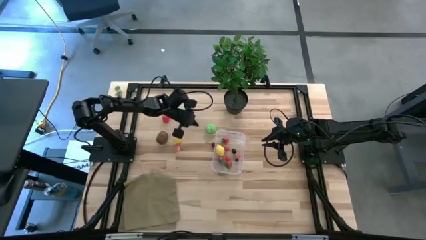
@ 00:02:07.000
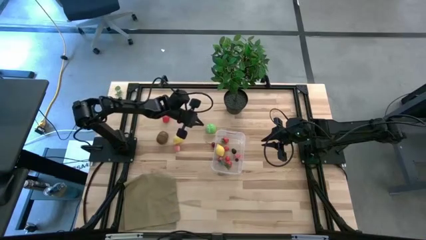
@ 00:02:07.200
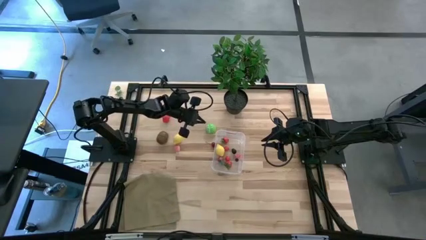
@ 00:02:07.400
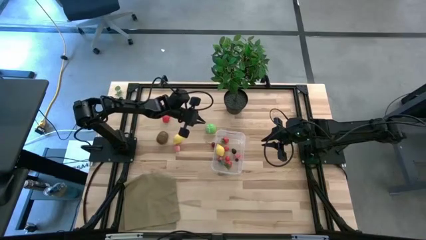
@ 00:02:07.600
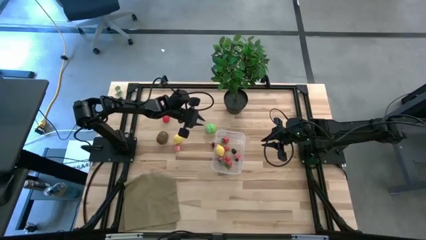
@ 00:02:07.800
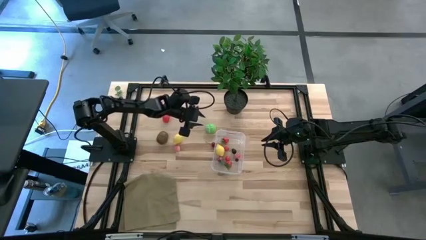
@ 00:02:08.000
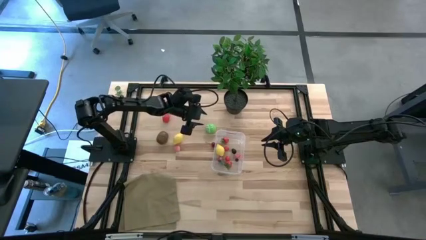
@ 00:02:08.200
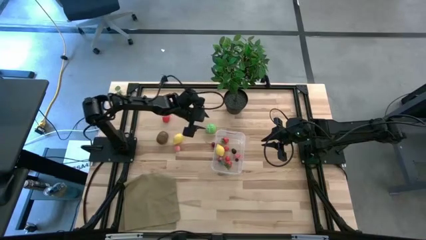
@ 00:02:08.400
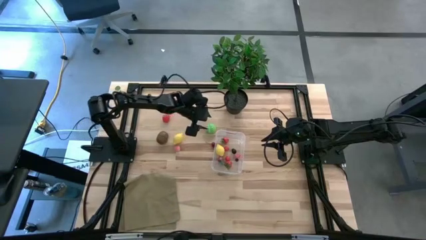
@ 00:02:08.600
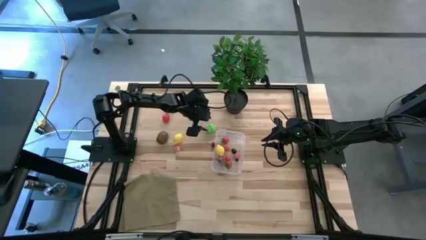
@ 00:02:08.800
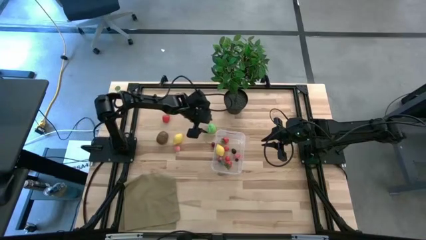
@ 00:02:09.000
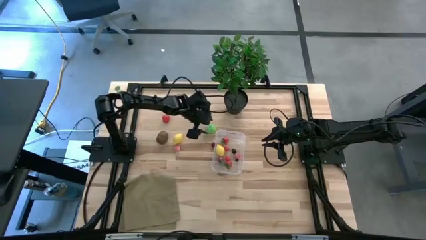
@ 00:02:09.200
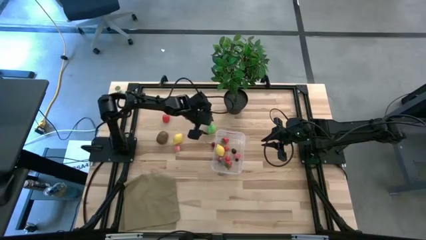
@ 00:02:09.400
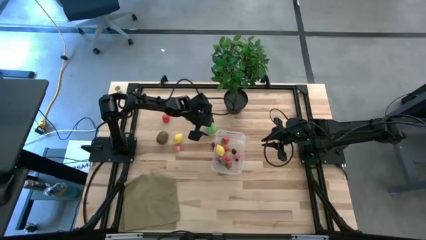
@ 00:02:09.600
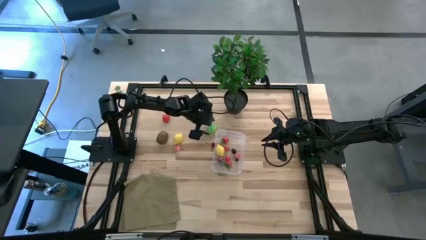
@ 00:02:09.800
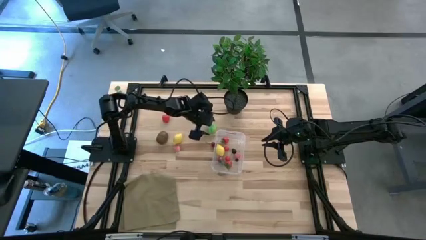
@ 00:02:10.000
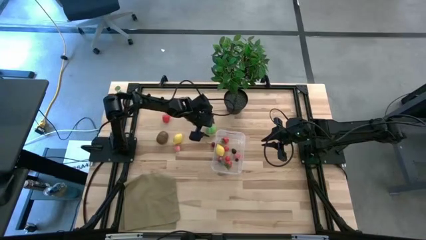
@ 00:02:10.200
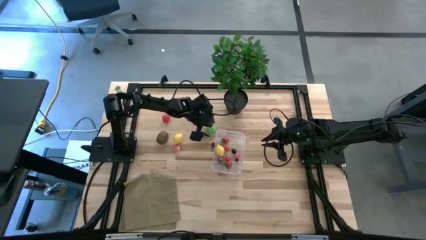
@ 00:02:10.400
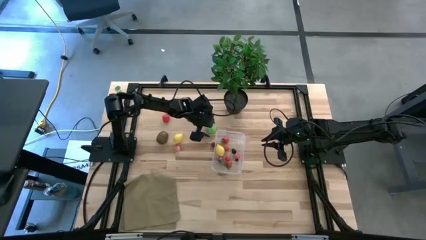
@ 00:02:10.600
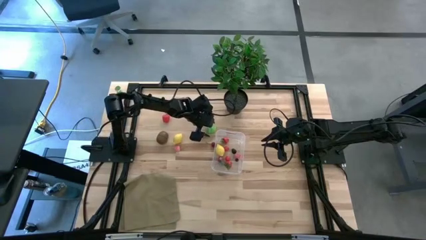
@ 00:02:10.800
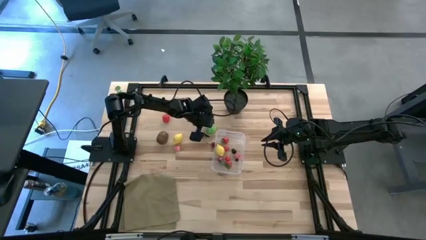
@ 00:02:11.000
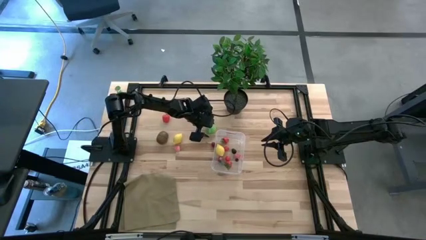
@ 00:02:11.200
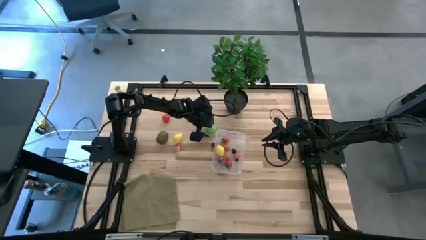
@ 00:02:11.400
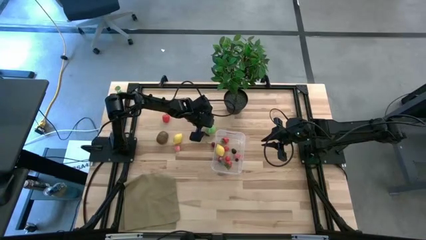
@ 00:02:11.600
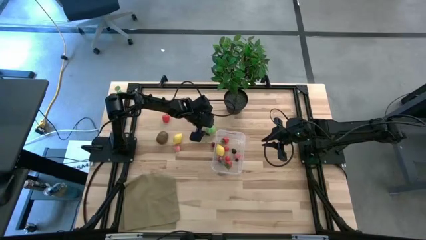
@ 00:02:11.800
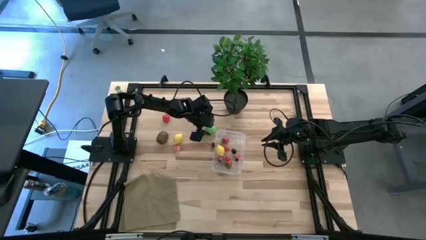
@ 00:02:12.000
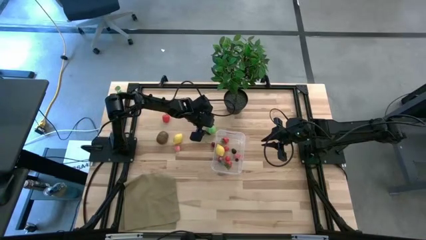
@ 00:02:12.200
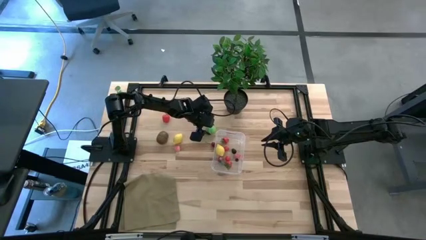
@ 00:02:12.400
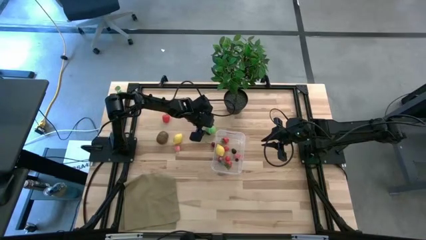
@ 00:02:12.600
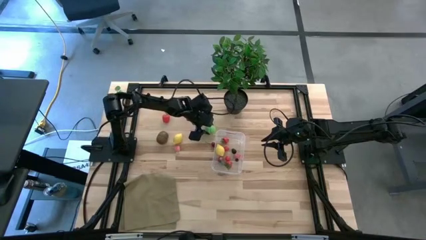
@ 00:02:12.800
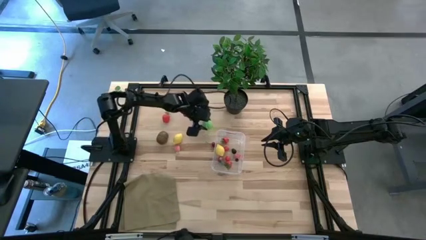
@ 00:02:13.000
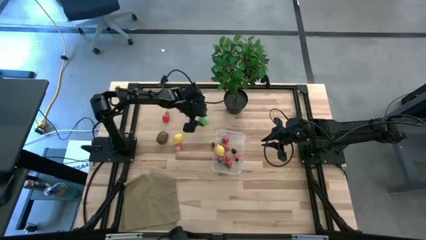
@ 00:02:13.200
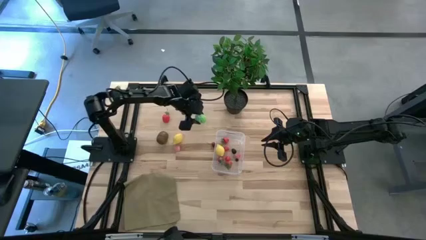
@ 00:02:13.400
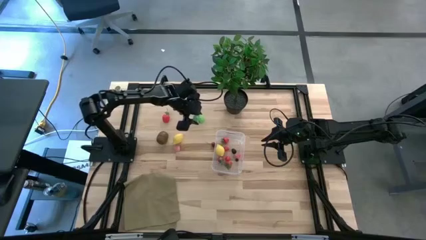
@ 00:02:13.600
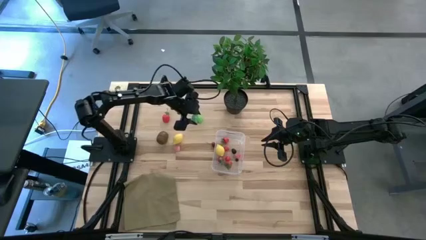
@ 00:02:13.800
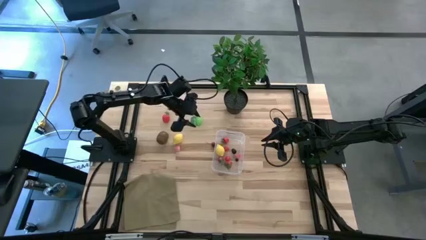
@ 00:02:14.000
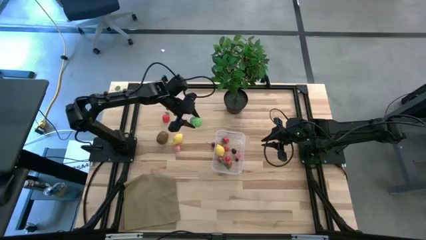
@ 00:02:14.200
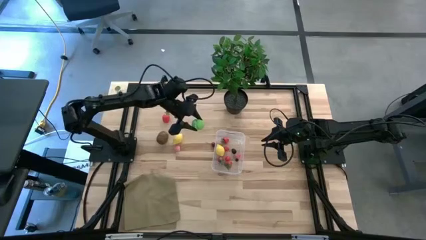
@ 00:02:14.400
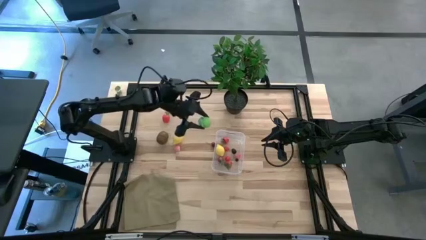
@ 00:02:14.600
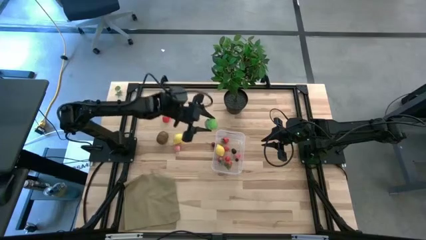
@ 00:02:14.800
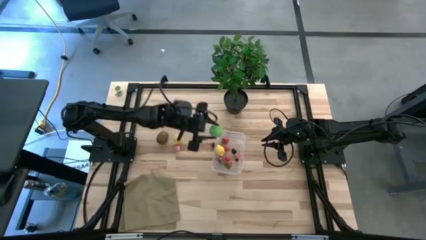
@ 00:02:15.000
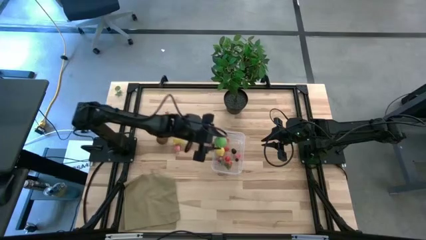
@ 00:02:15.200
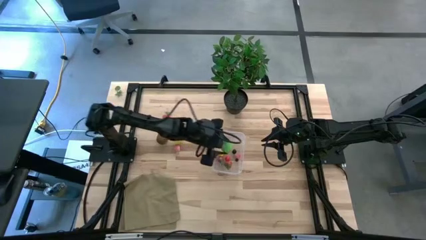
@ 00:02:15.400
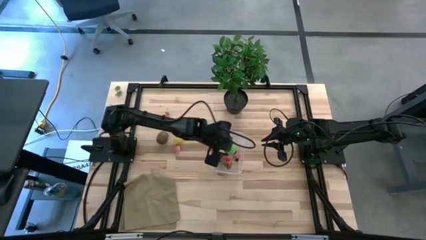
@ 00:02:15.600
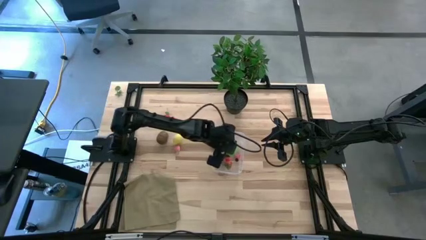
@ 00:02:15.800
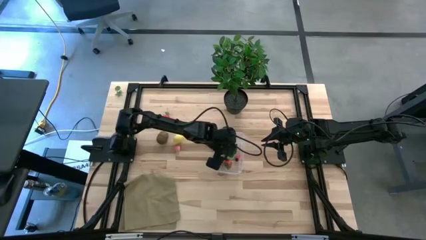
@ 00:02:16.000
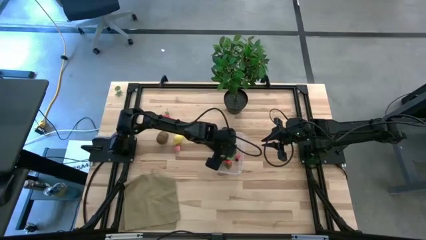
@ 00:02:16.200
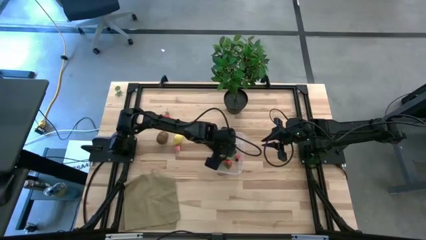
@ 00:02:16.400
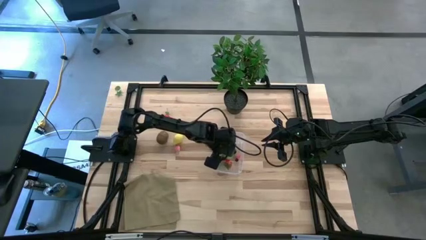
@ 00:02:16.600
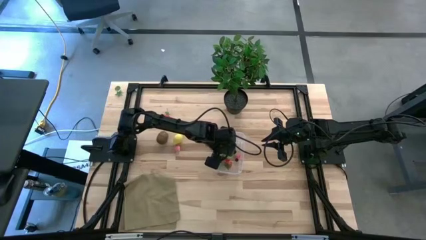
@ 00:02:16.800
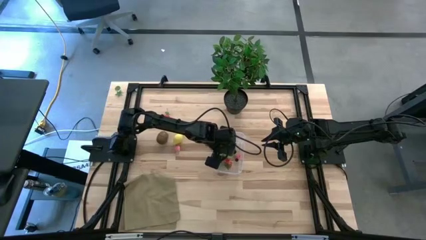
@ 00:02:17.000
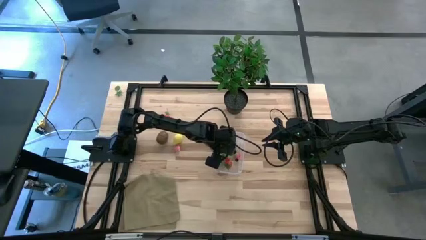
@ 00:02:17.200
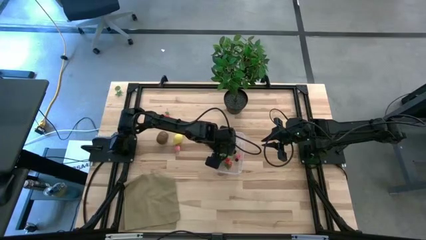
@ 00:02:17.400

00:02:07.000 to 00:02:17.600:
Task: Pick and placing Produce into tupperware
Put the green cabbage into the transparent container

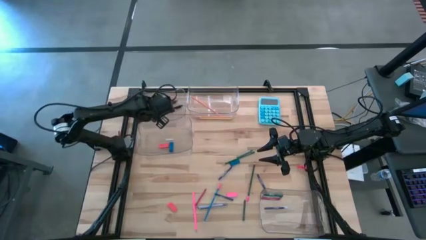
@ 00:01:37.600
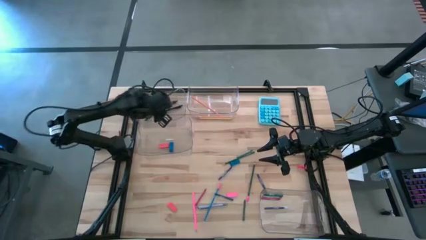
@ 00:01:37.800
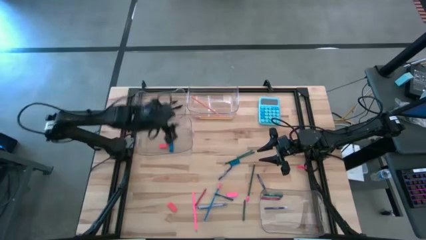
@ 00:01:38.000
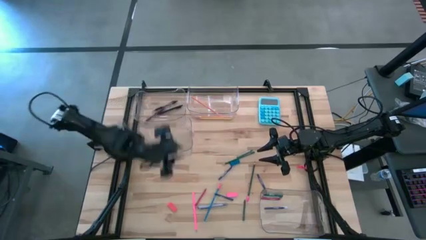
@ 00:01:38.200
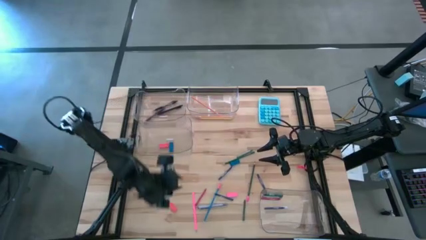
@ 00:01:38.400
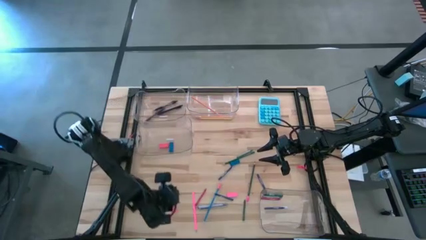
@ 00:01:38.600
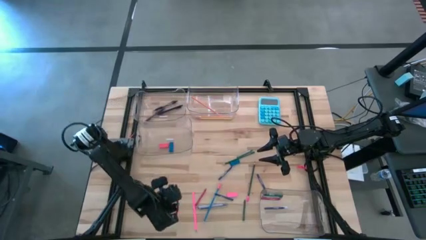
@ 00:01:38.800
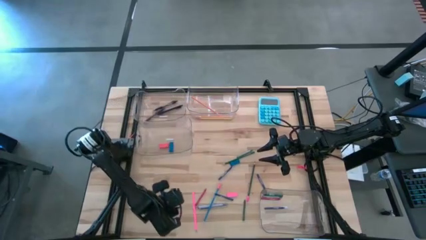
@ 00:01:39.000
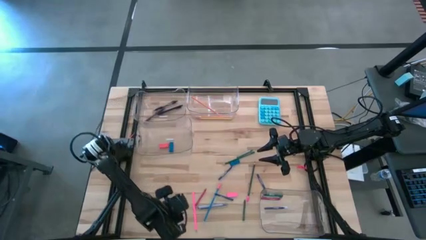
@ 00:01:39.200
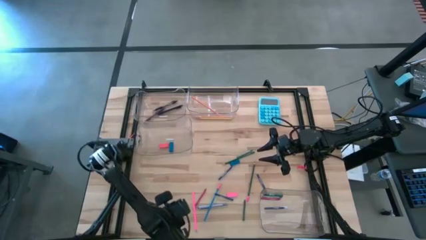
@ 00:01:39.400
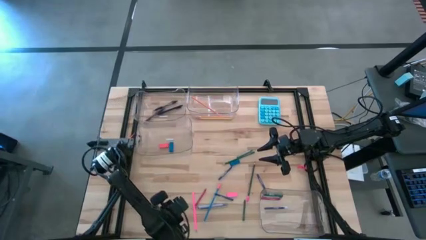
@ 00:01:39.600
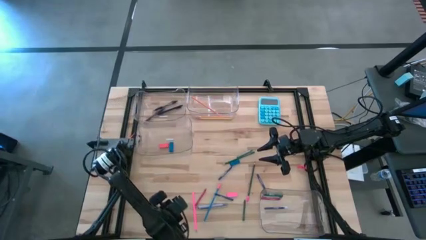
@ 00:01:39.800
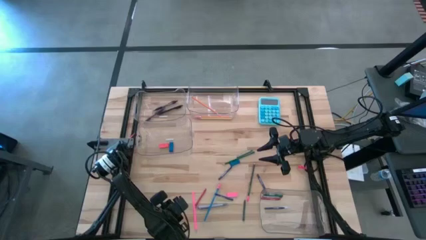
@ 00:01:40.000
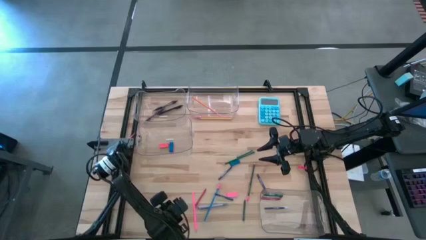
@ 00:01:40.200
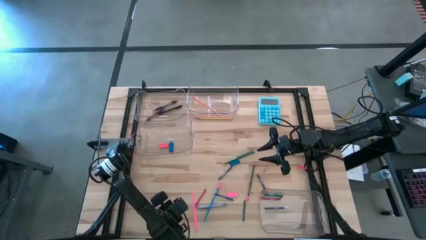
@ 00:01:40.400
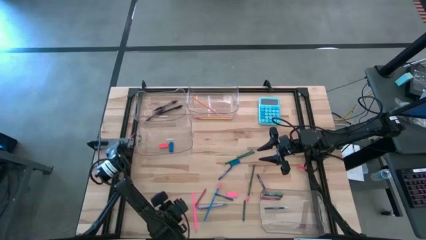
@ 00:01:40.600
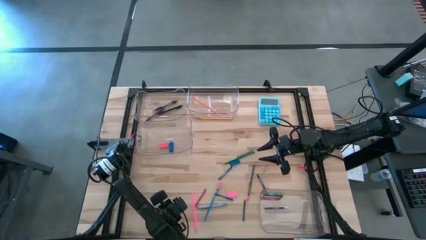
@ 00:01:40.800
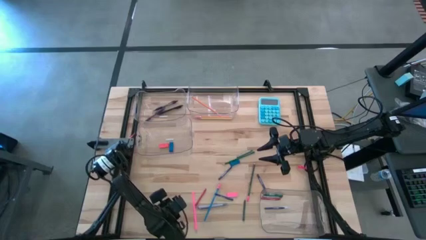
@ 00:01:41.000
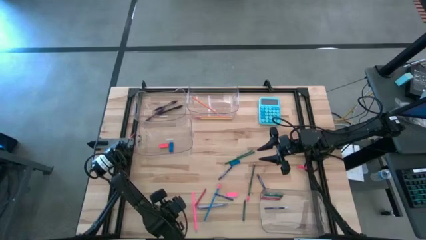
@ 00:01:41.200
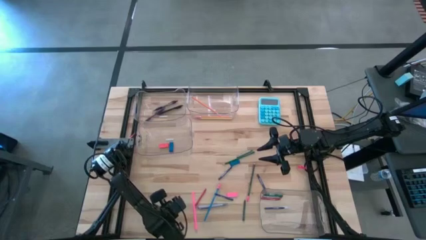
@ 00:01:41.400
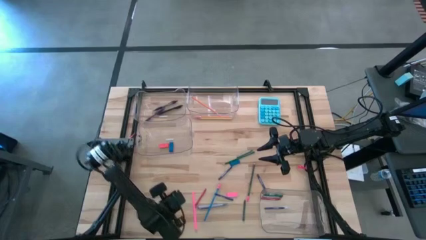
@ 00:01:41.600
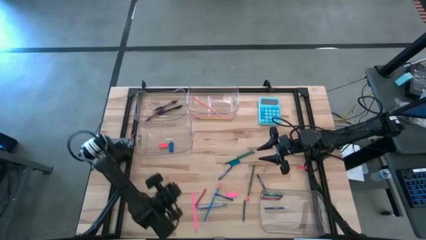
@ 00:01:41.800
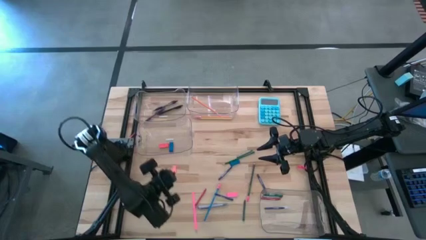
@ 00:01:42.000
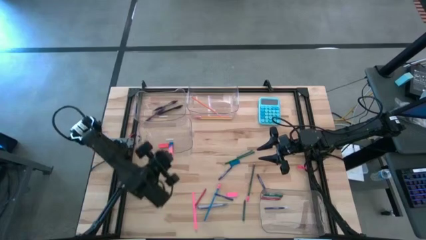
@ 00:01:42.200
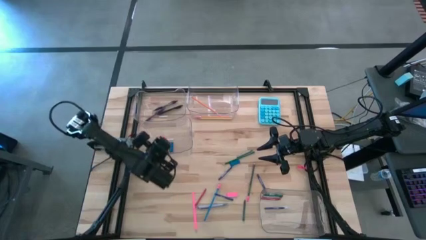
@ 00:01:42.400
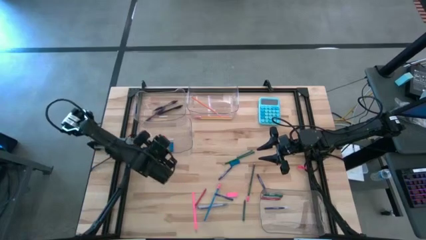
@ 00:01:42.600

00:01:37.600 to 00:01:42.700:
Task: Sort crayons/erasers/pens/pencils in bins
Put the orange eraser into the middle left transparent bin
